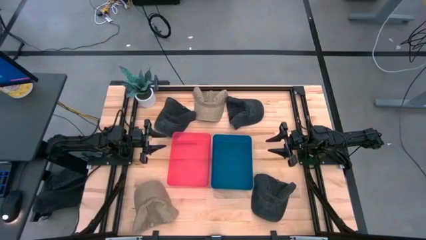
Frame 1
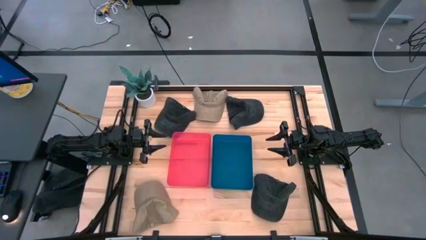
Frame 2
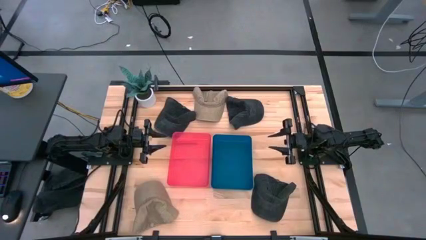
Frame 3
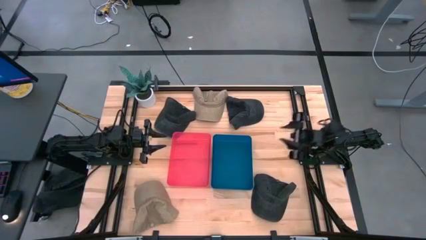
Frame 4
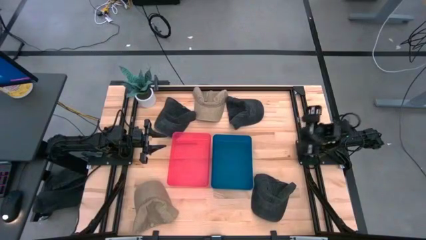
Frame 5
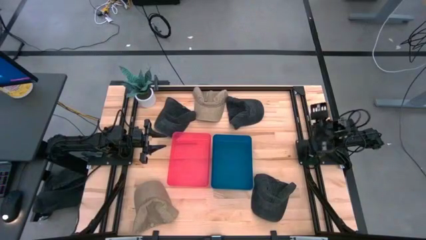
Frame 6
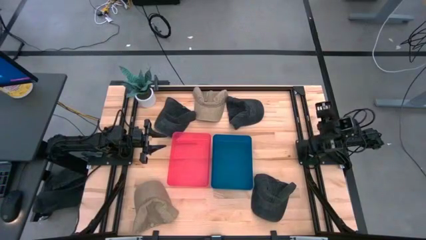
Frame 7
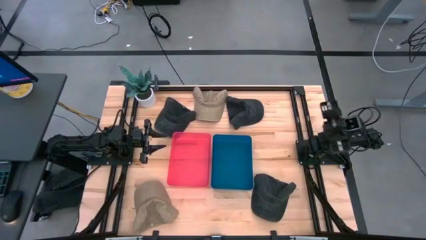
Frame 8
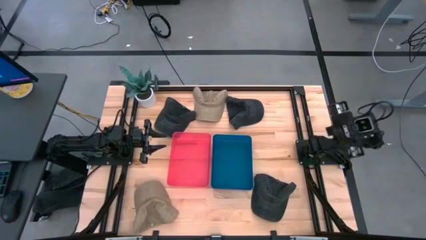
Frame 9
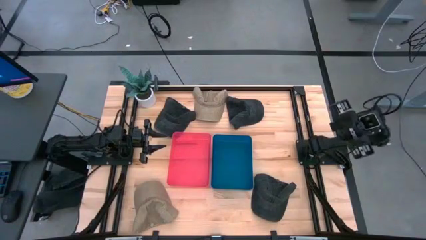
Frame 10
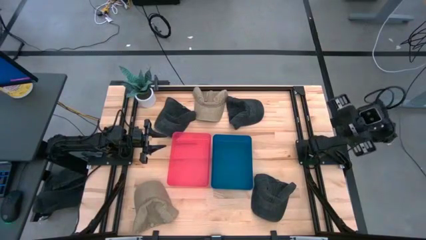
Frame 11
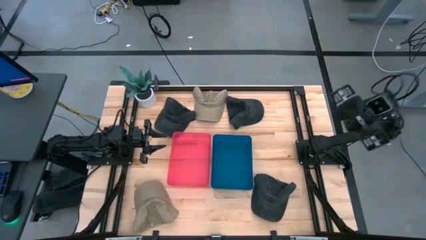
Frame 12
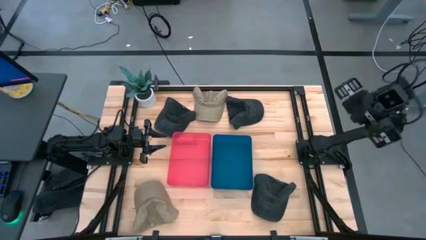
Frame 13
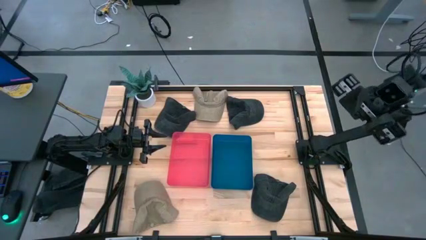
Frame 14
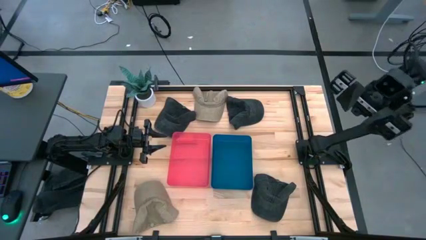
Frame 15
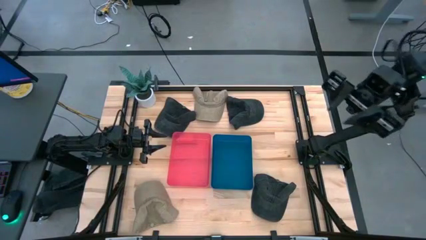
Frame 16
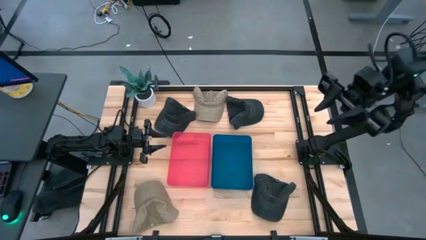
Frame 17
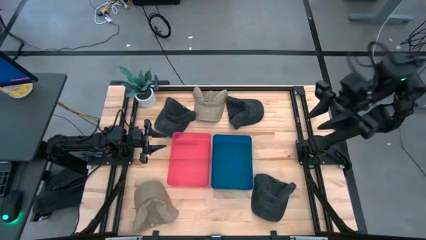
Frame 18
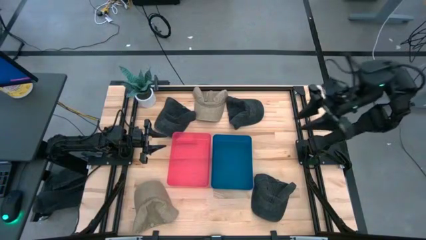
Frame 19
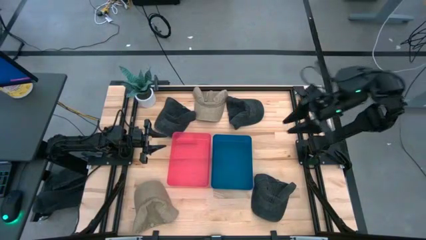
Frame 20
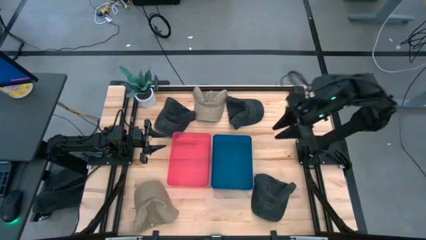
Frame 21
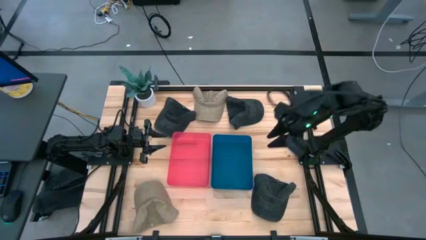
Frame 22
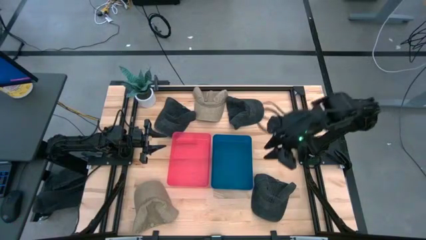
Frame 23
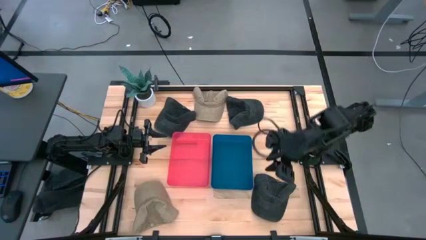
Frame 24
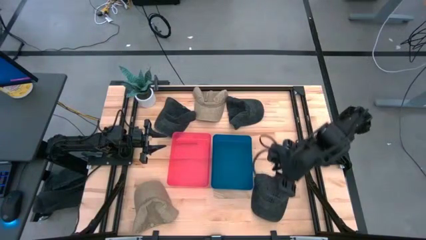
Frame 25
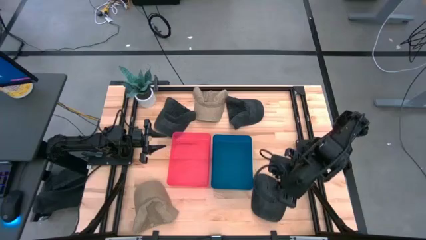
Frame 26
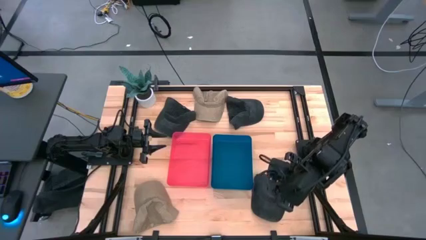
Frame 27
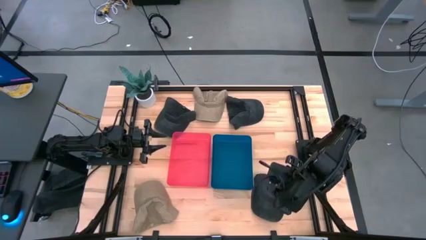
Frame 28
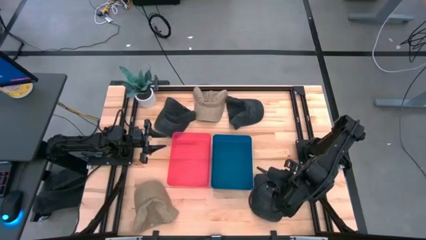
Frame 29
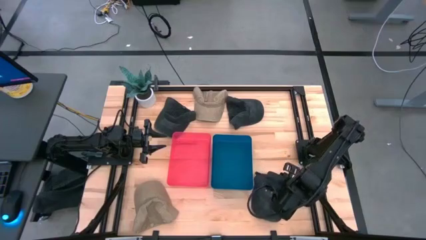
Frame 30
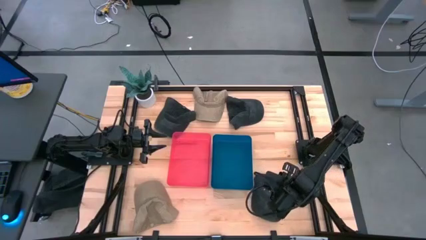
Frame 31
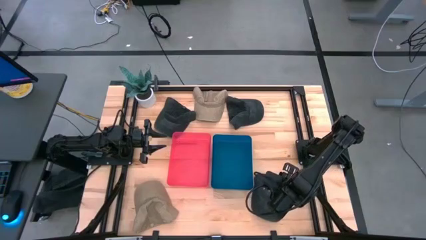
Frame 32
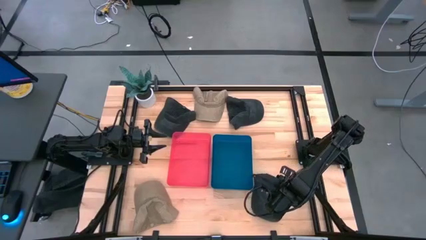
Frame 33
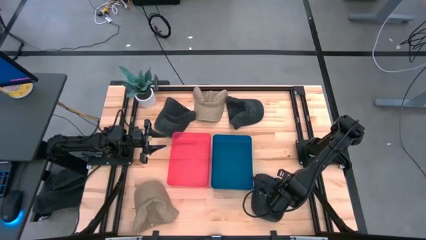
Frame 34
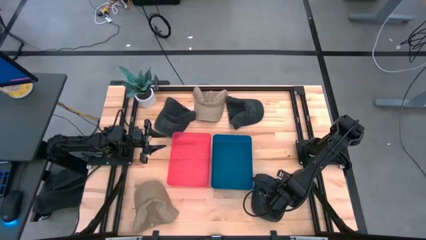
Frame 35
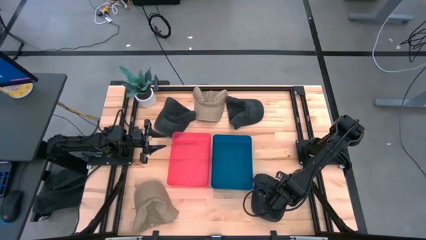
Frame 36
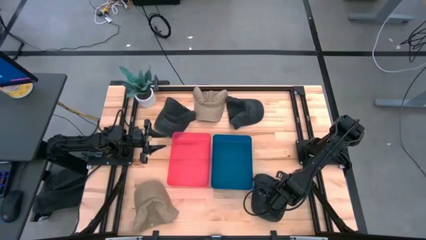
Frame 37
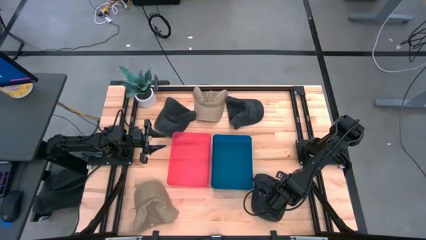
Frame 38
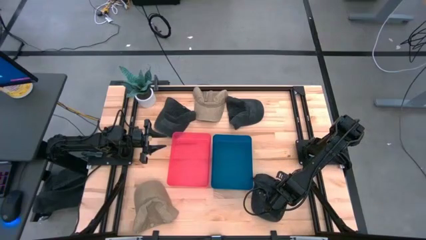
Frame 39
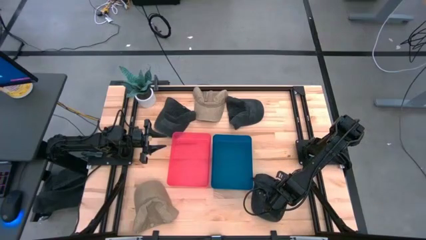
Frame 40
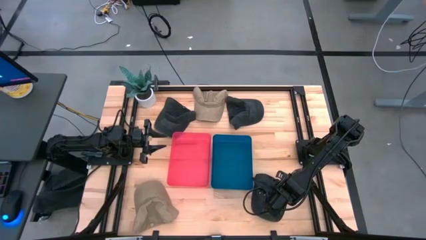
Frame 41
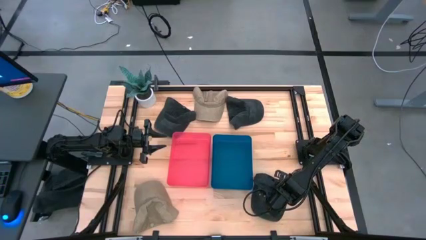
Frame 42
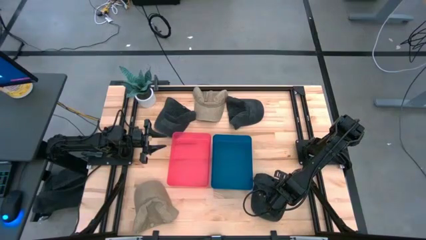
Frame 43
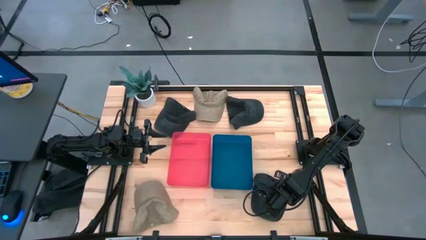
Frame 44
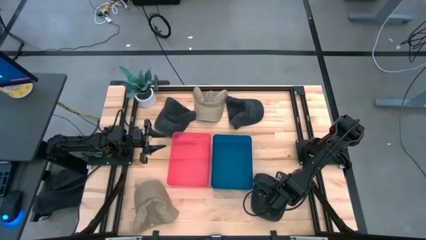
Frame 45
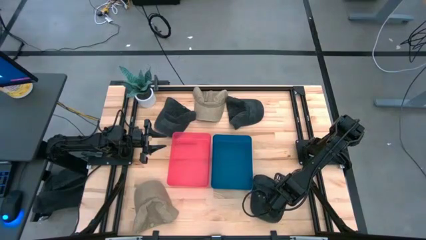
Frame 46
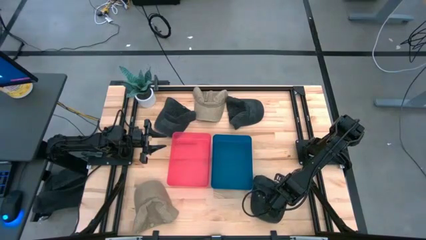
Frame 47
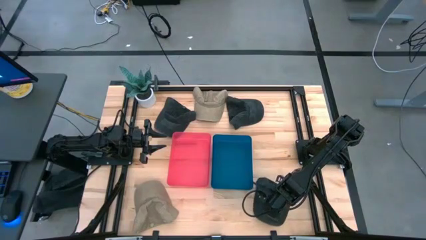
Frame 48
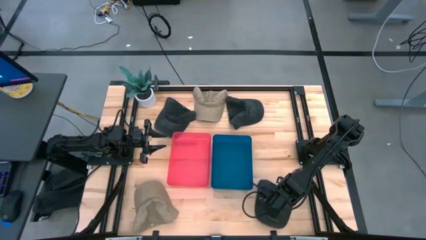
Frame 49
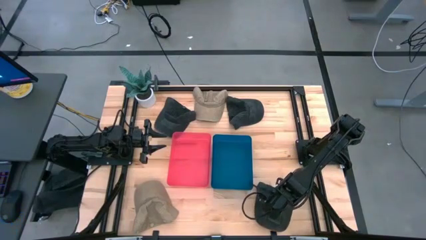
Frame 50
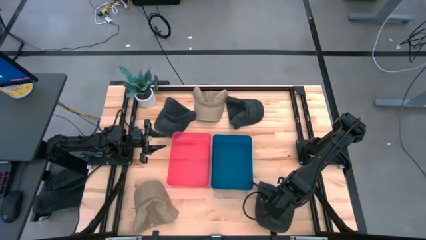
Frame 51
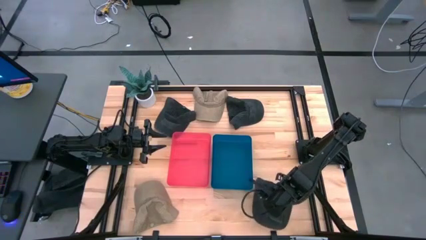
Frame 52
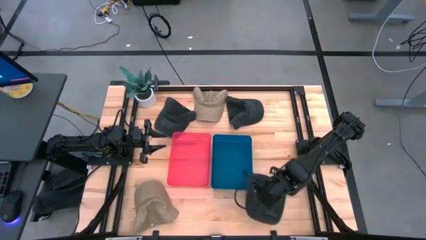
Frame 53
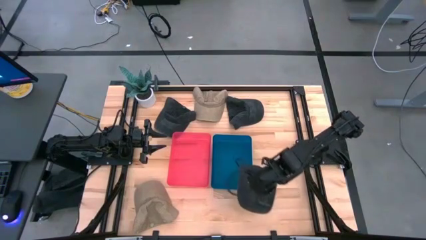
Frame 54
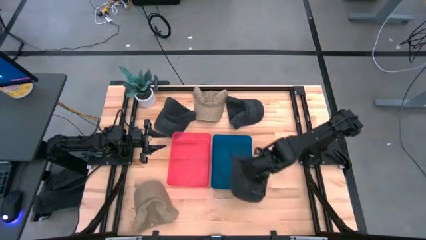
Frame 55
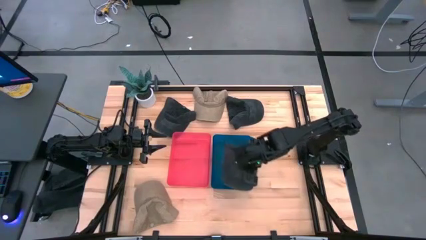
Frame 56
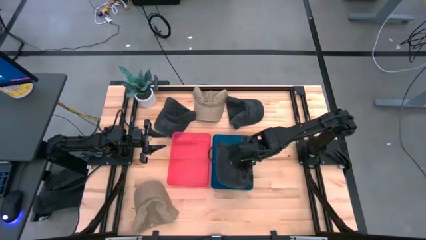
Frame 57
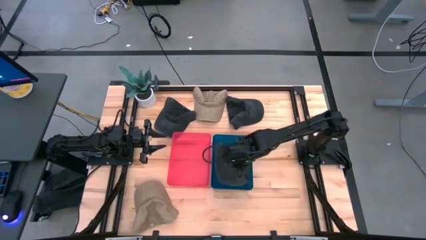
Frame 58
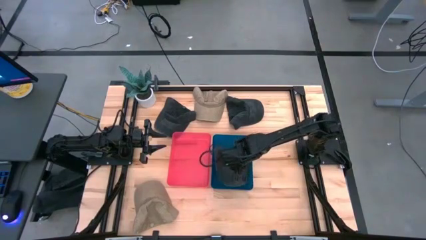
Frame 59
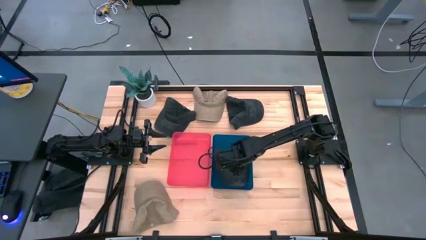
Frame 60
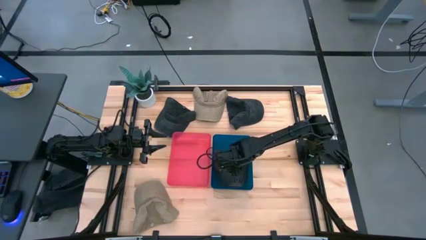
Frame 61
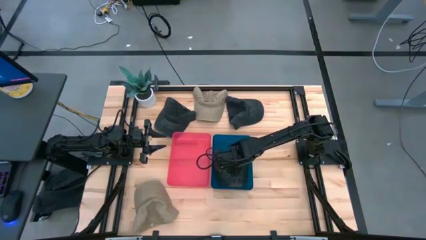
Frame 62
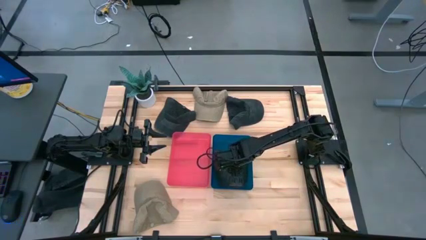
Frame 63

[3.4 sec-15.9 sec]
Task: Pick & Place hat
Put the bottom black cap into the blue bin

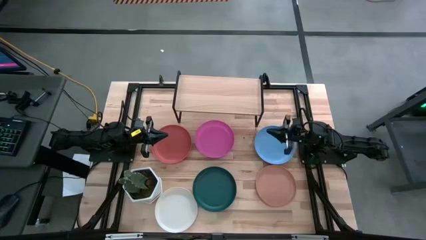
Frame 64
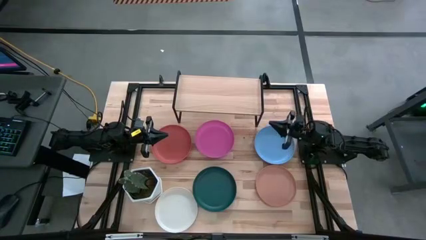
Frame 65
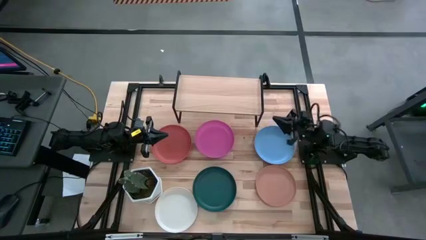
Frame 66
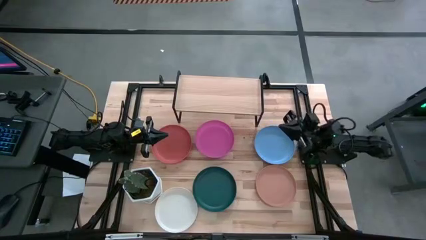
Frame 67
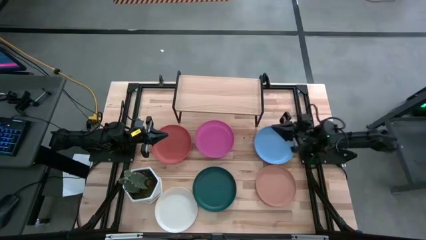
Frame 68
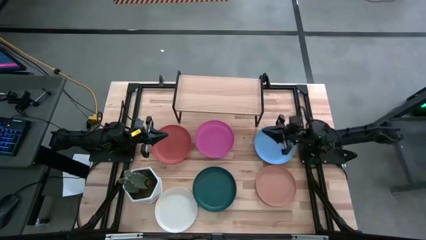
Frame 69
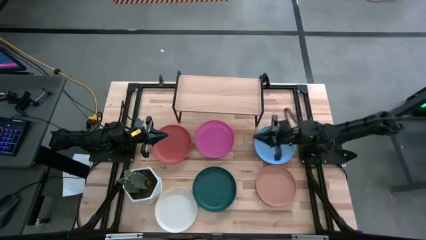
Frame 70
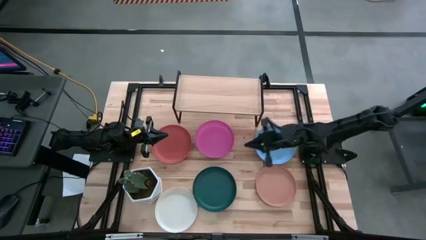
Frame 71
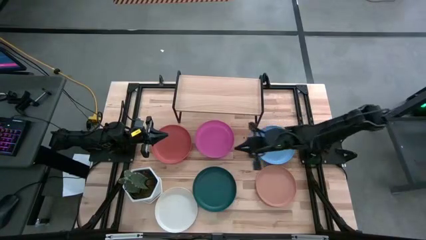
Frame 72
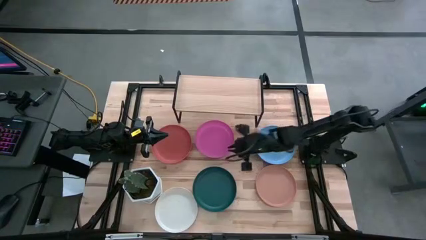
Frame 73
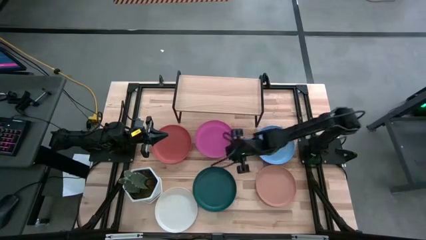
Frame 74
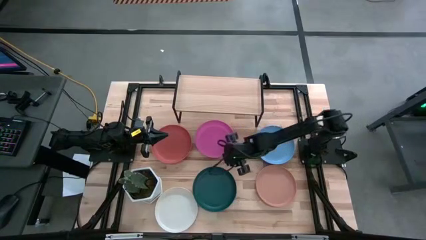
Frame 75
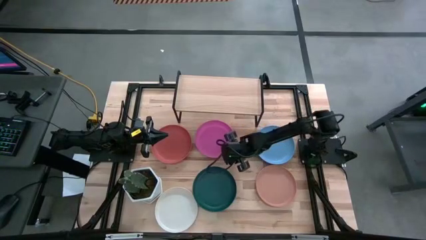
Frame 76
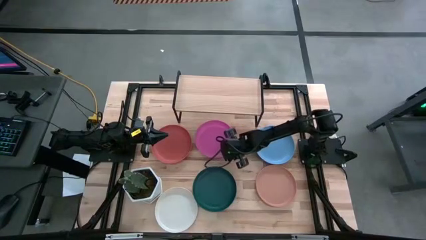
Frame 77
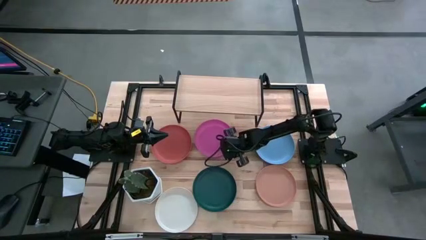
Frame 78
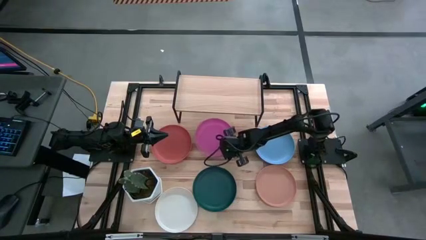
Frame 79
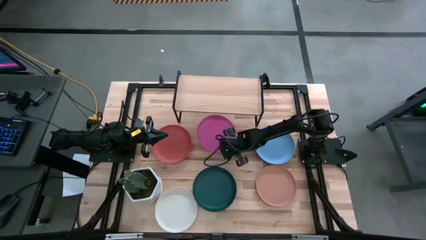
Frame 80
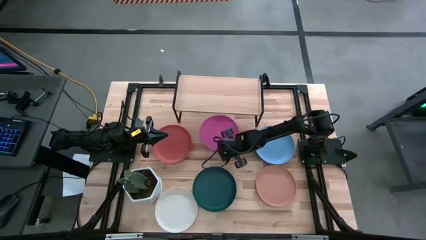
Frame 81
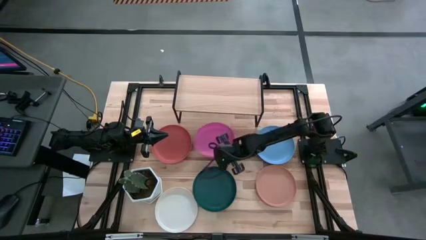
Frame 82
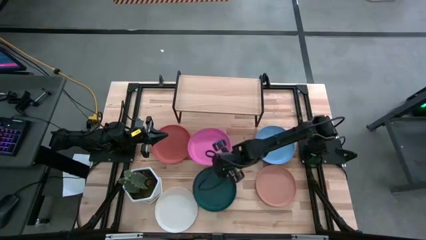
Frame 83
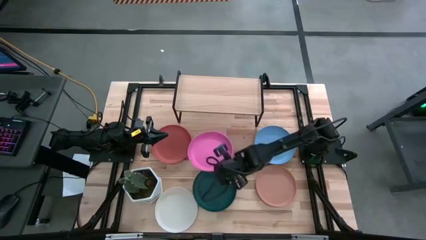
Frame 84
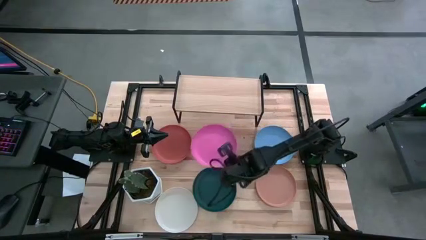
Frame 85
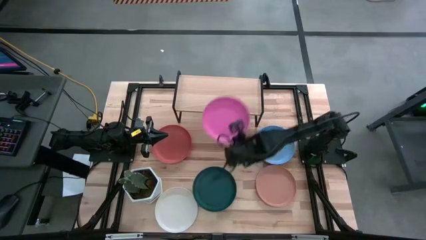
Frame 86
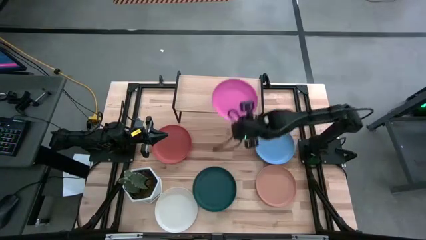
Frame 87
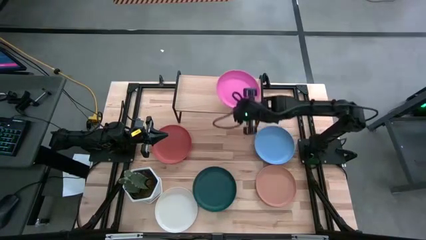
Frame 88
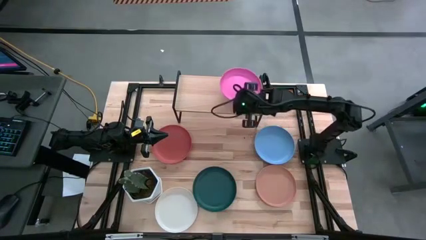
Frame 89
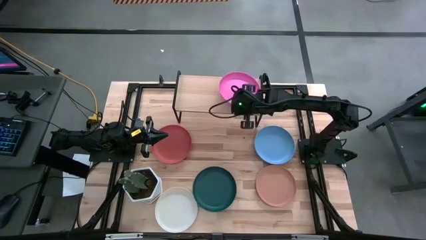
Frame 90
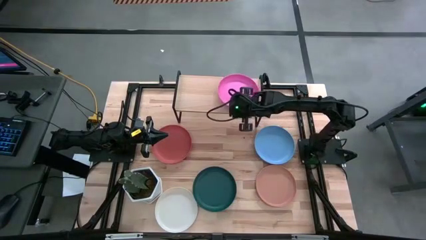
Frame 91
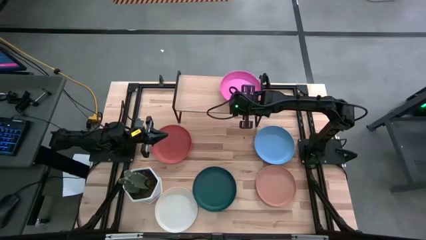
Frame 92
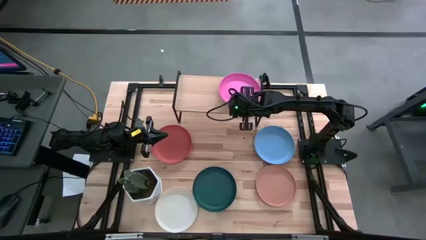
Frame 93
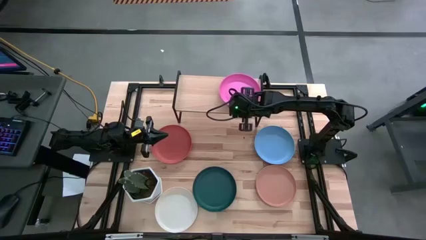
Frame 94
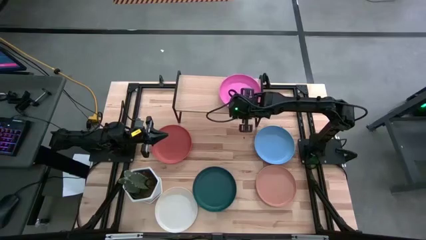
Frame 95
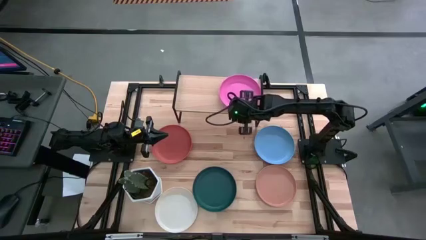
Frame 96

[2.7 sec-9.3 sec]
Task: Place and stack plates onto a shelf
Put the pink plate on the shelf
